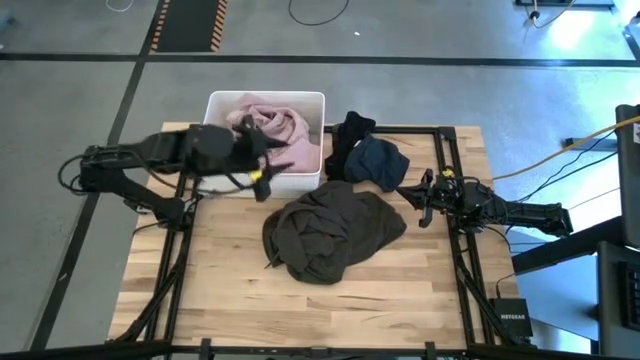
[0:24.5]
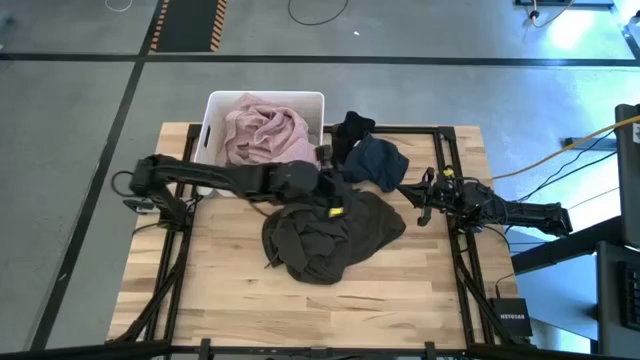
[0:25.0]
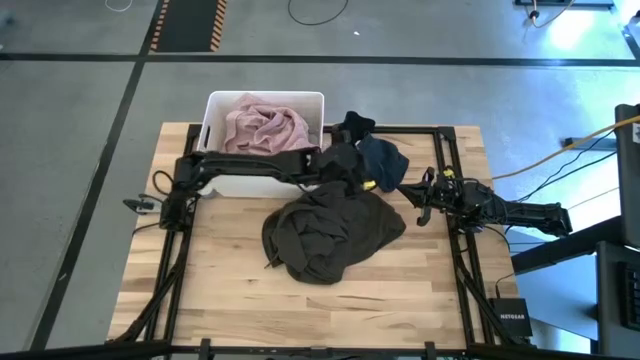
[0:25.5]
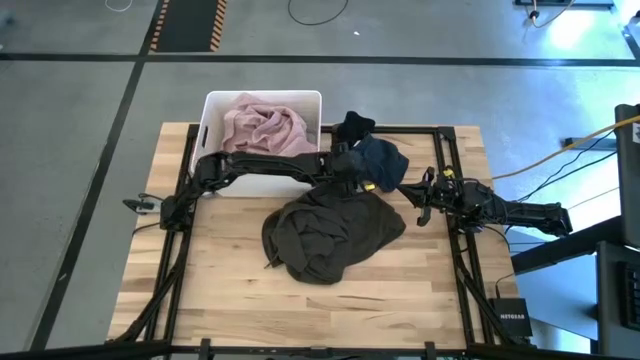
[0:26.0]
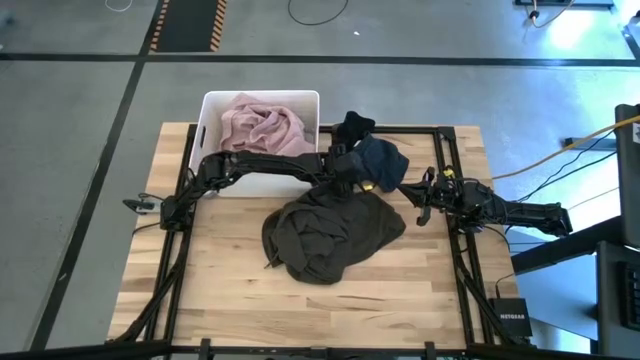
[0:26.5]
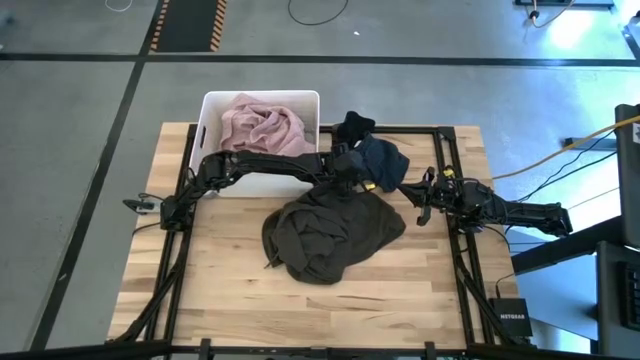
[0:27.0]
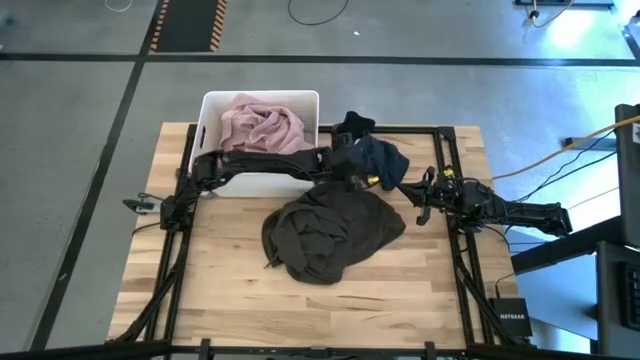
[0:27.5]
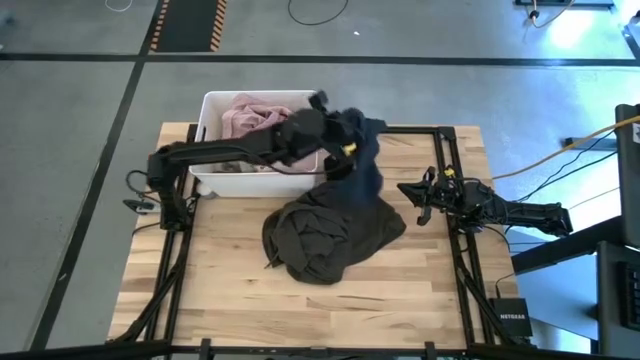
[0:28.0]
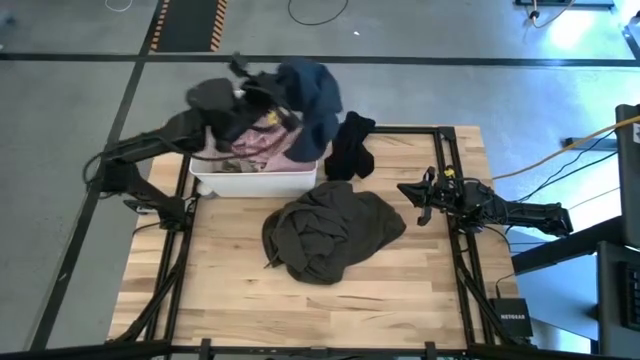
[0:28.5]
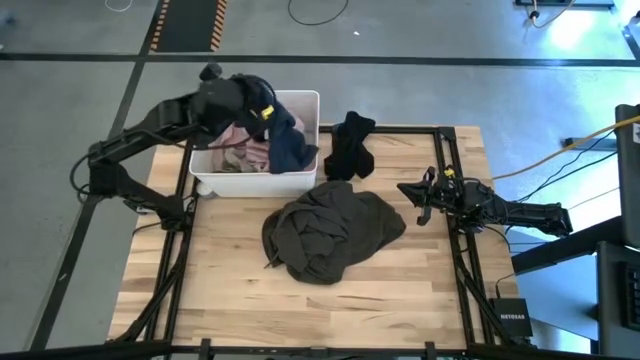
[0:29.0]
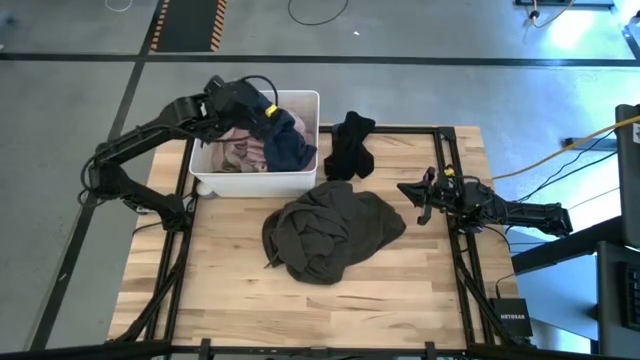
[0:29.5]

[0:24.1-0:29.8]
Task: Sort clothes
Put the blue shirt into the bin

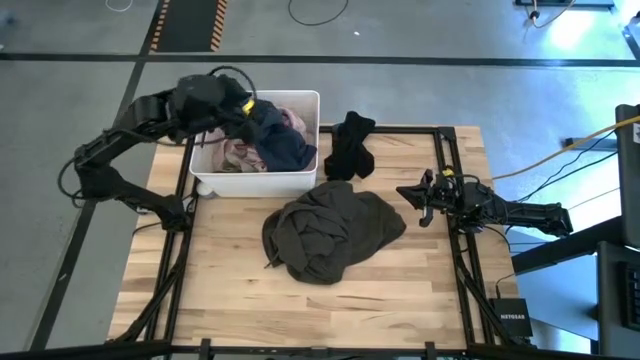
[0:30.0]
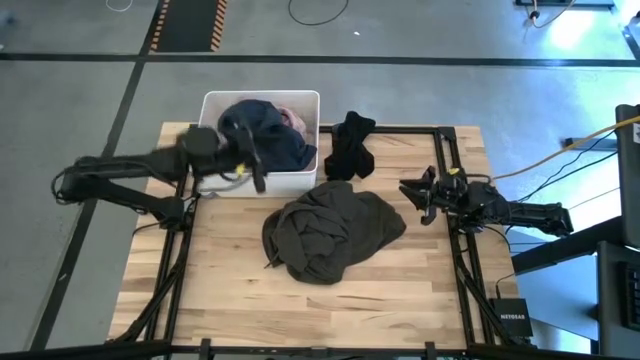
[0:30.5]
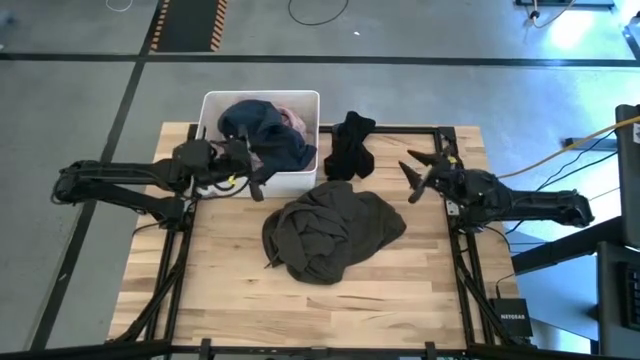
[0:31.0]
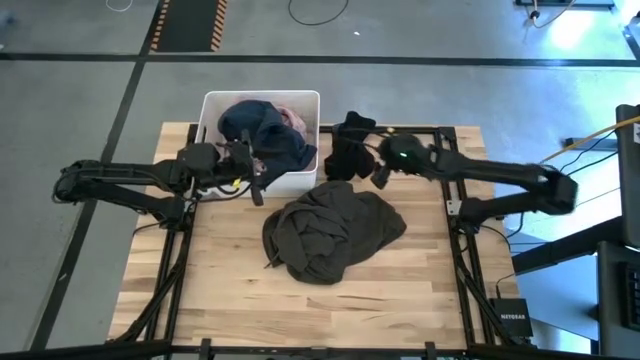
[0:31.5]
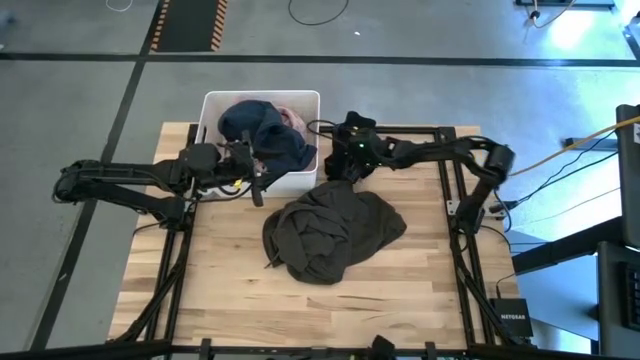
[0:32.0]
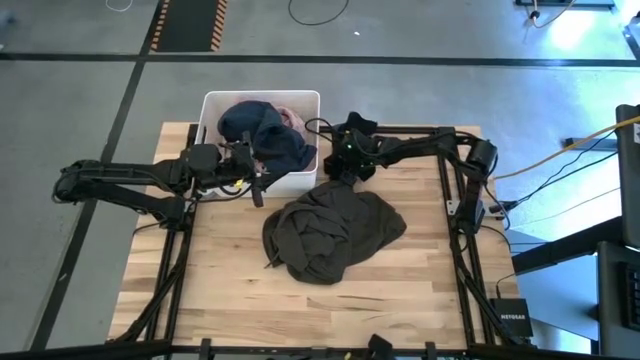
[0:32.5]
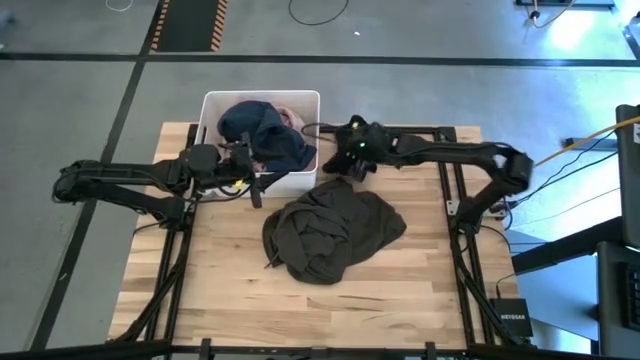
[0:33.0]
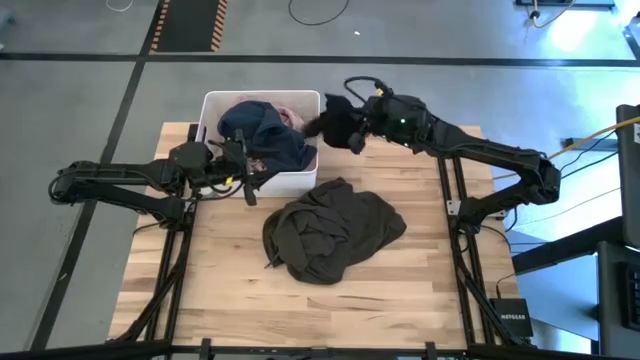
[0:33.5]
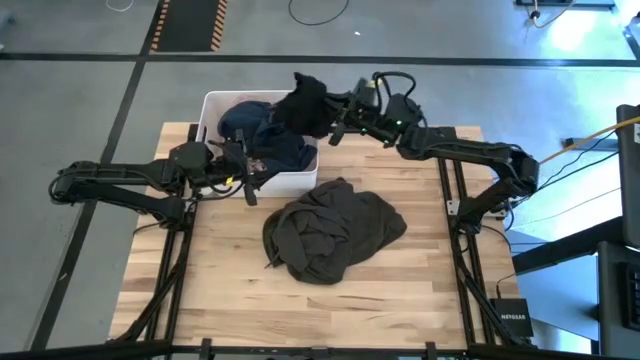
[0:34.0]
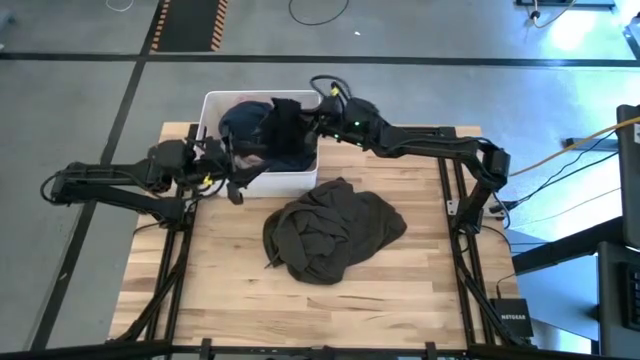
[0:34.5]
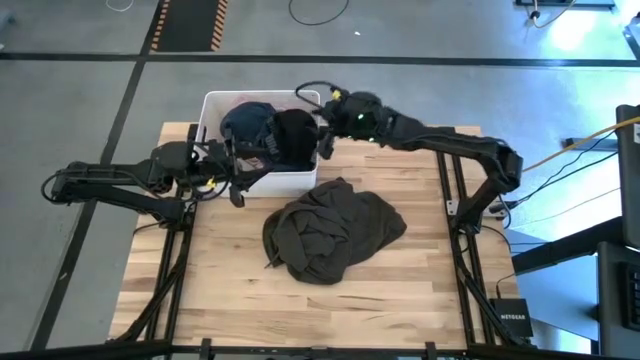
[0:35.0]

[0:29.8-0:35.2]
Put the black underwear into the bin

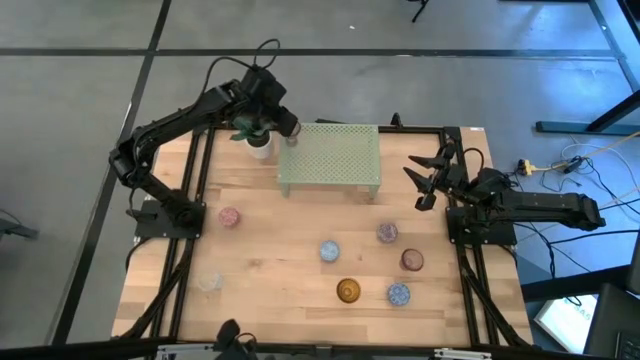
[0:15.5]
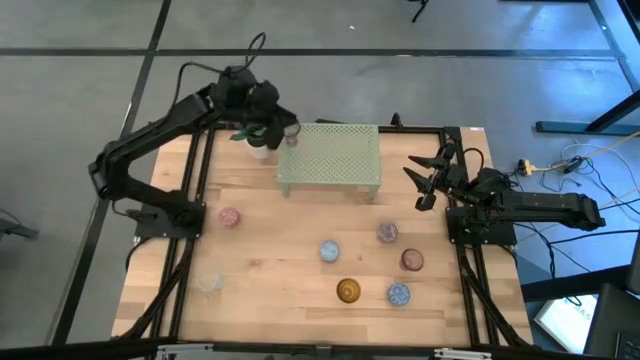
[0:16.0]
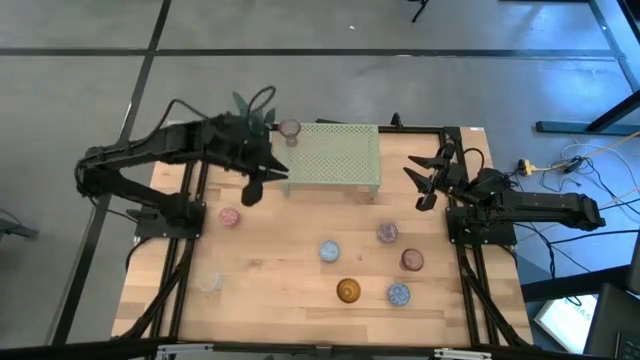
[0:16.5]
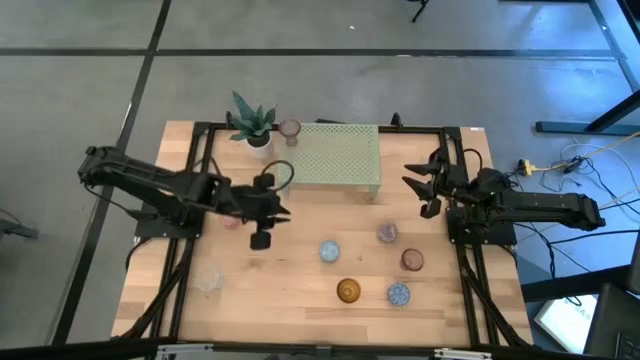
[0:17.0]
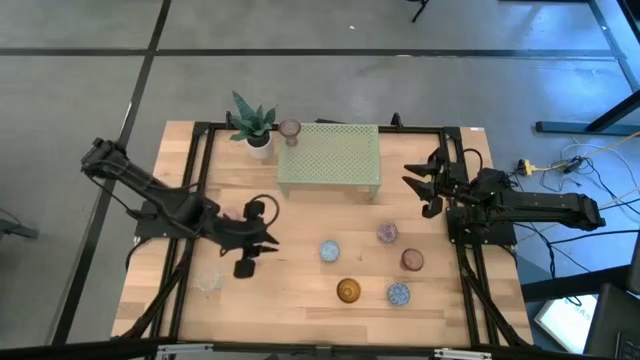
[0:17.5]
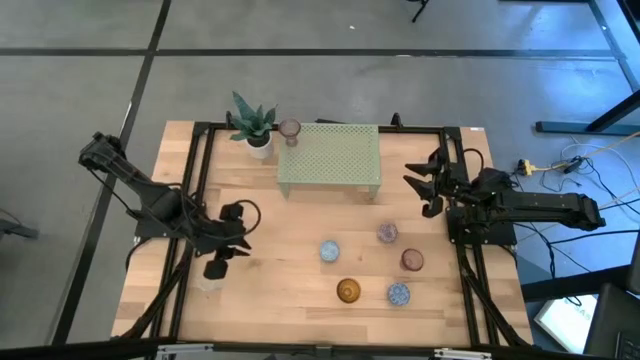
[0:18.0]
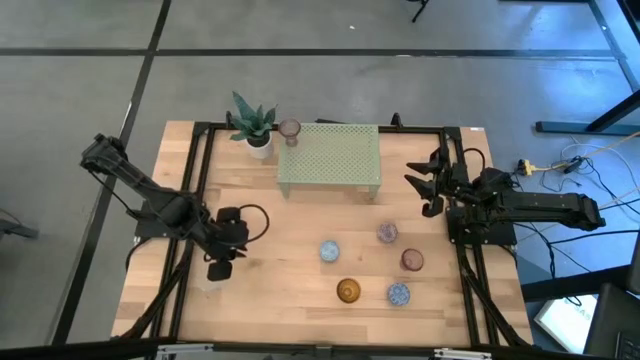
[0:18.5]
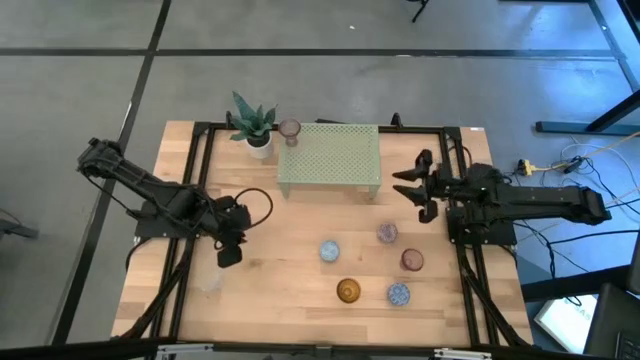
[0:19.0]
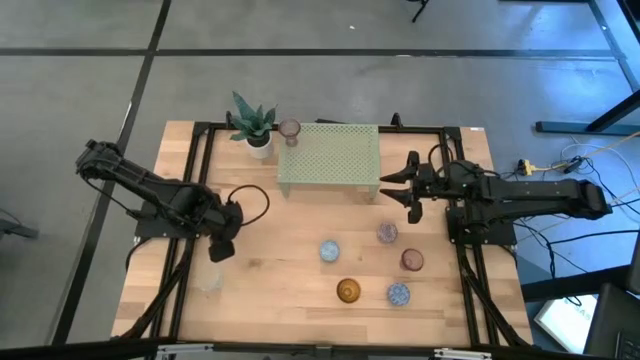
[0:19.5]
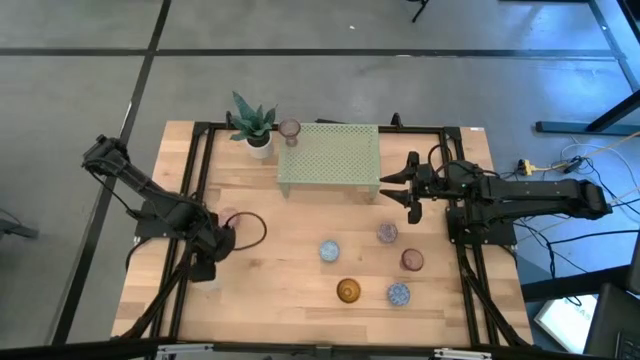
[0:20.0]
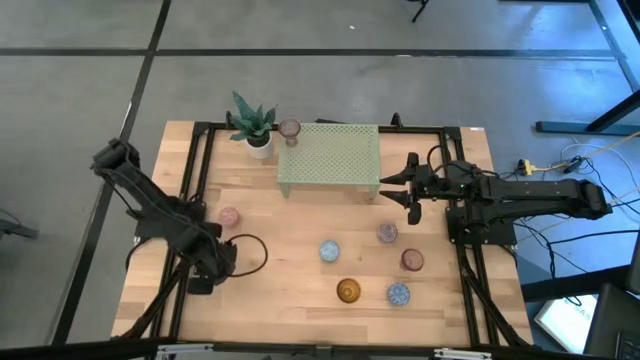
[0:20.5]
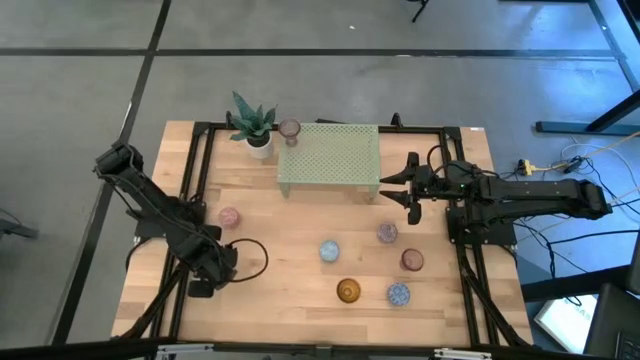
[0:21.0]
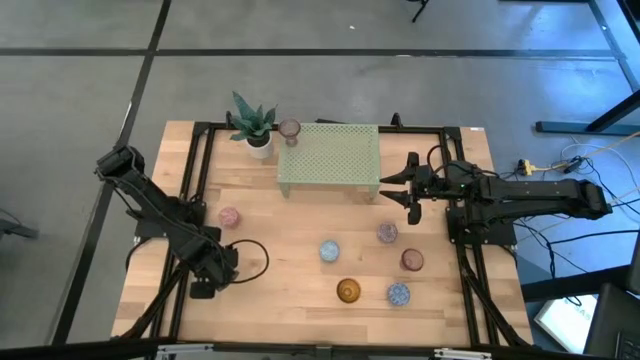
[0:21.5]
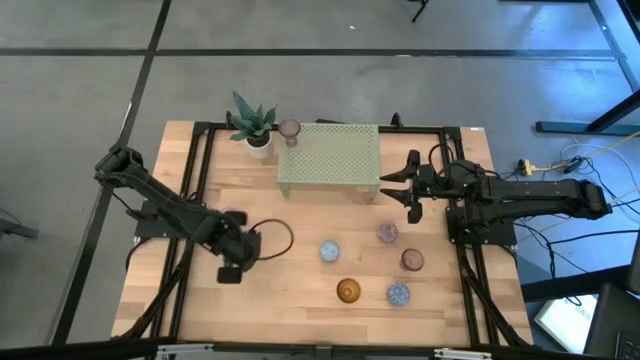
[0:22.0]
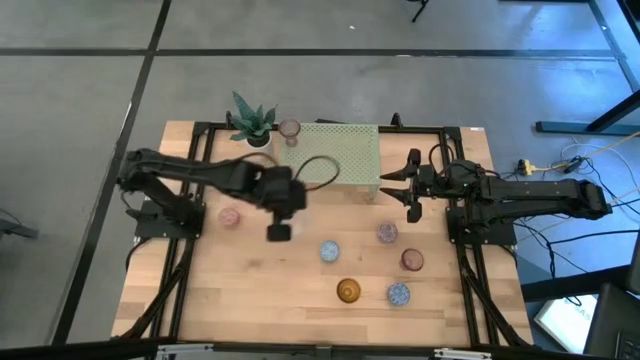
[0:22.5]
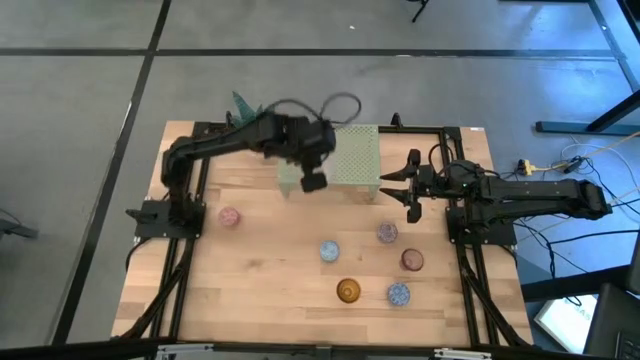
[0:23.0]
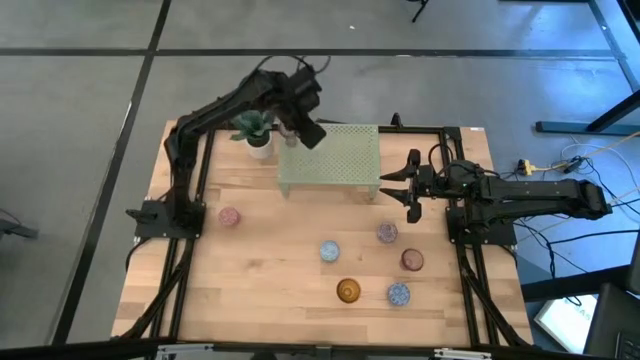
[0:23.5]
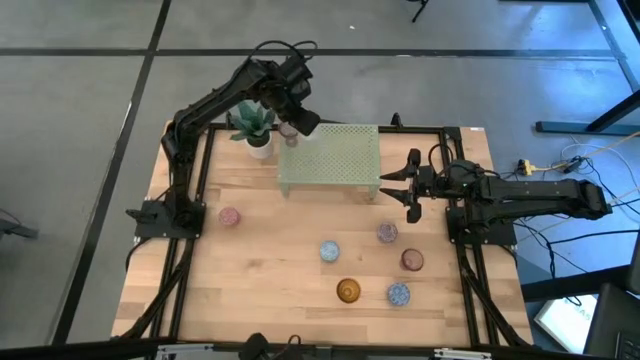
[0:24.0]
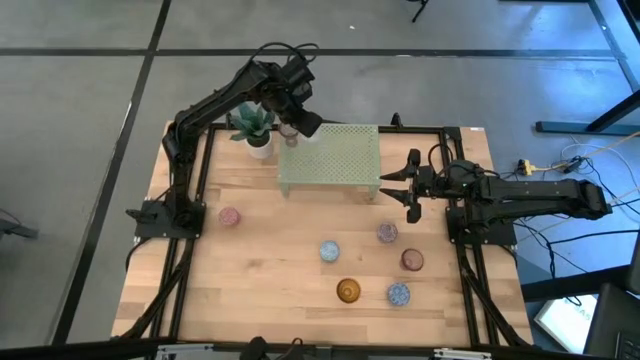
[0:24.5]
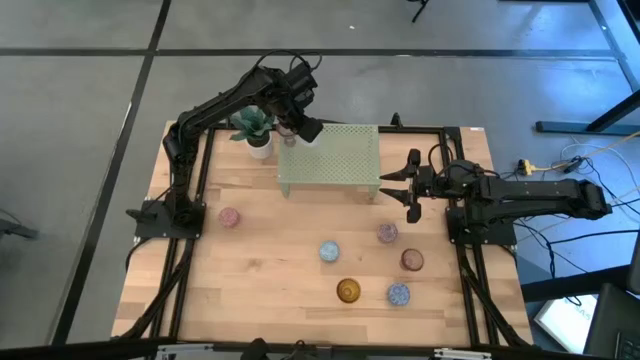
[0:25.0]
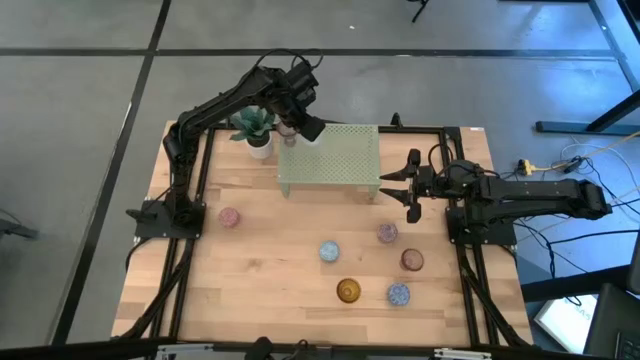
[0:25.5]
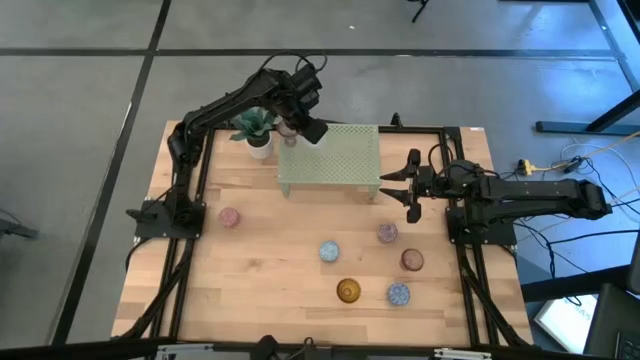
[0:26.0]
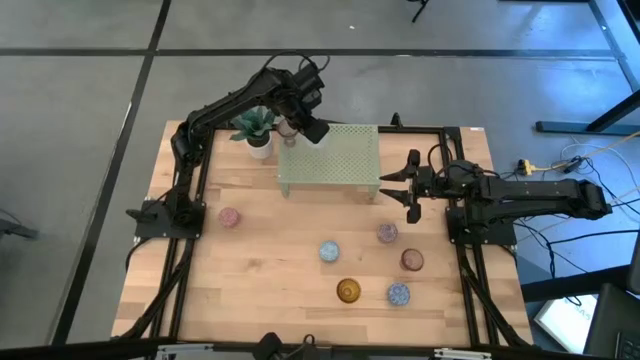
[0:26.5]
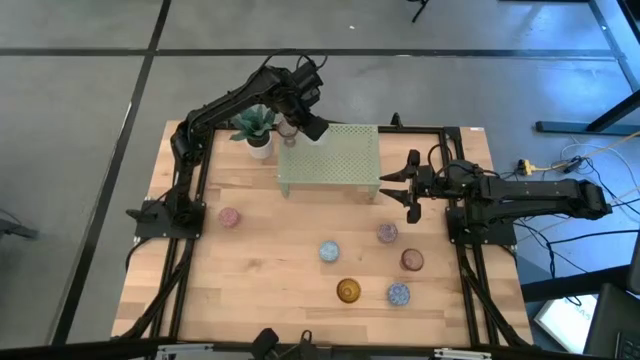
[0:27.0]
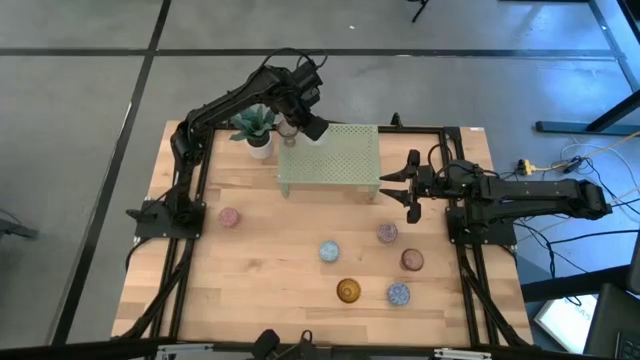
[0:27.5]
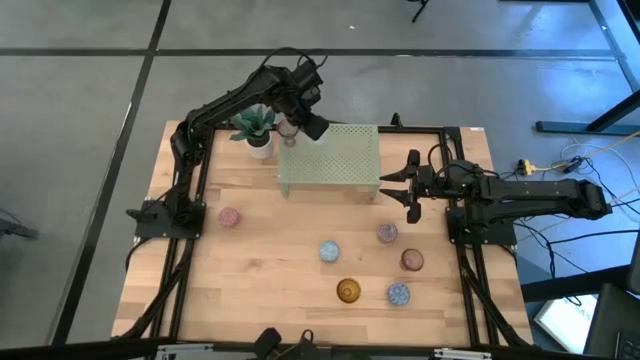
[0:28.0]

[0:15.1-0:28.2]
Task: Pick & Place candle stick holders
Put the transparent glass candle holder on the shelf
